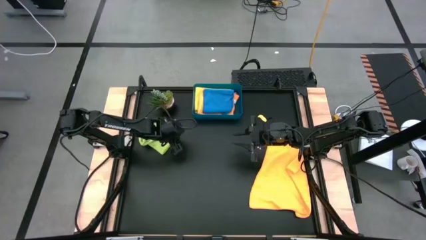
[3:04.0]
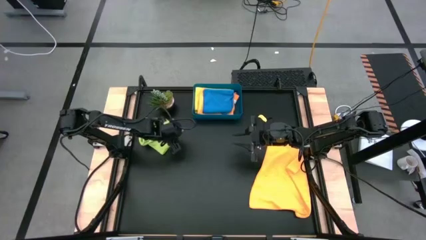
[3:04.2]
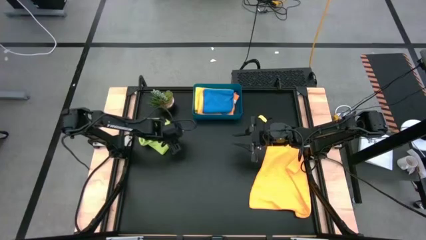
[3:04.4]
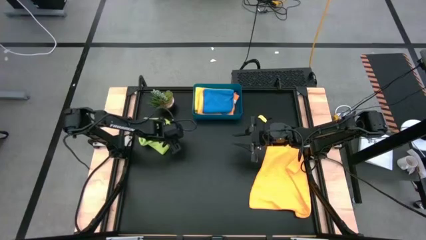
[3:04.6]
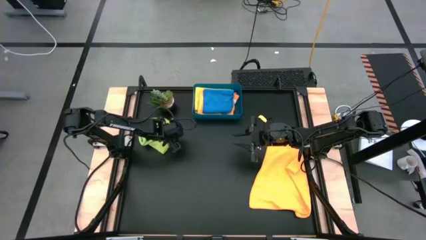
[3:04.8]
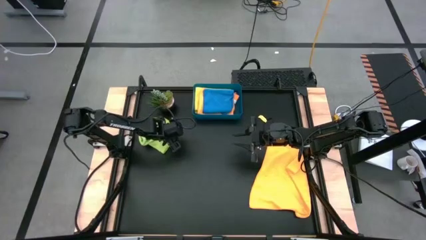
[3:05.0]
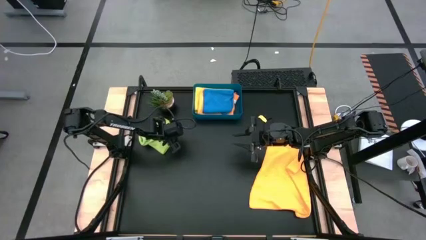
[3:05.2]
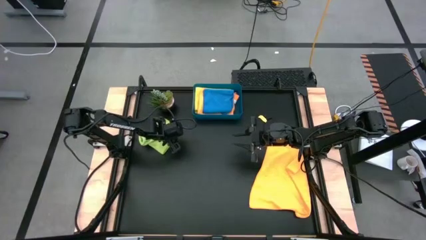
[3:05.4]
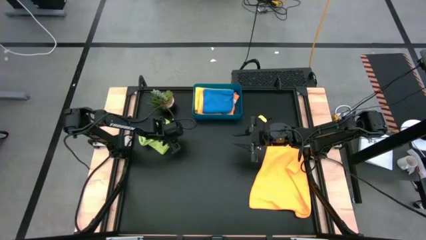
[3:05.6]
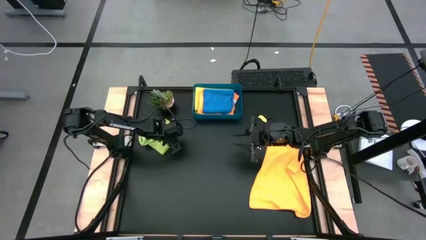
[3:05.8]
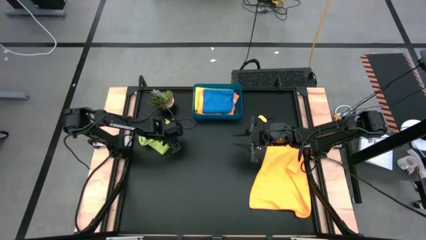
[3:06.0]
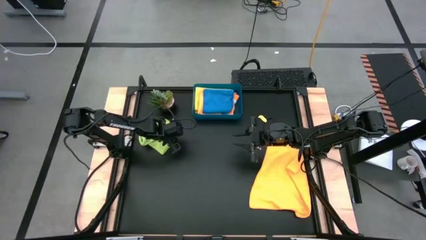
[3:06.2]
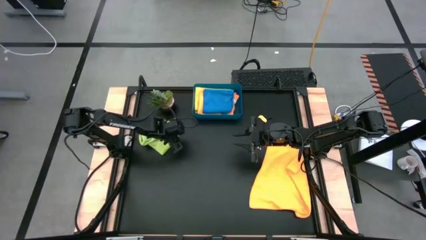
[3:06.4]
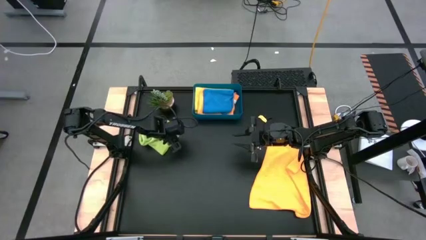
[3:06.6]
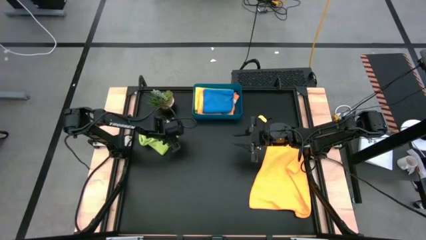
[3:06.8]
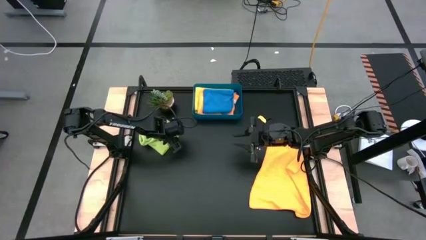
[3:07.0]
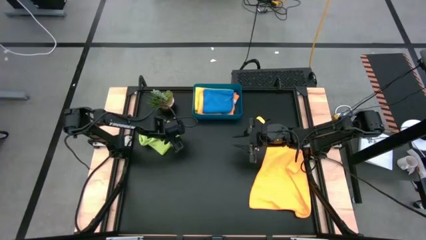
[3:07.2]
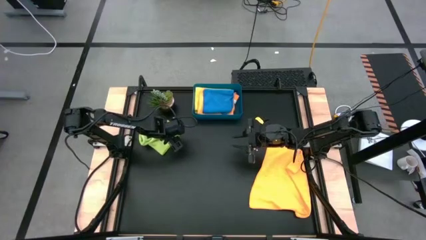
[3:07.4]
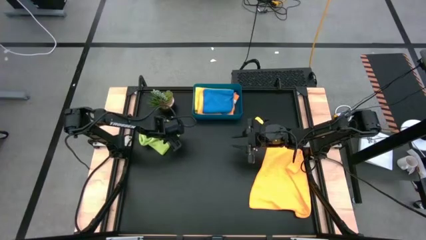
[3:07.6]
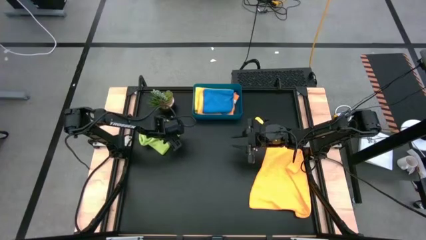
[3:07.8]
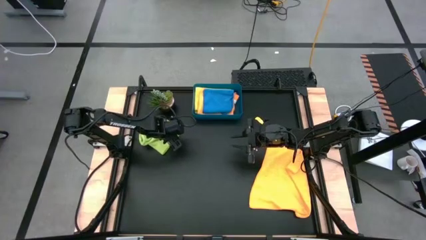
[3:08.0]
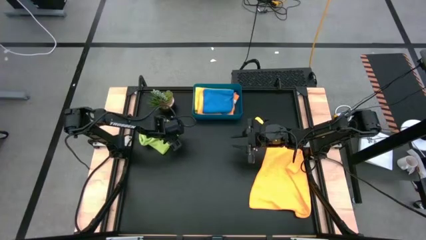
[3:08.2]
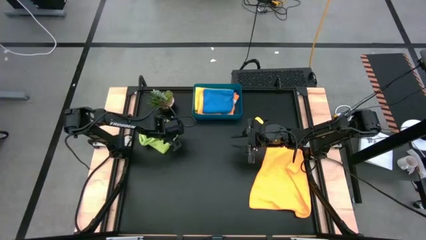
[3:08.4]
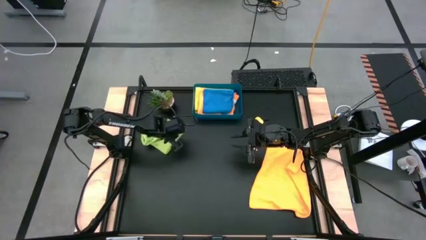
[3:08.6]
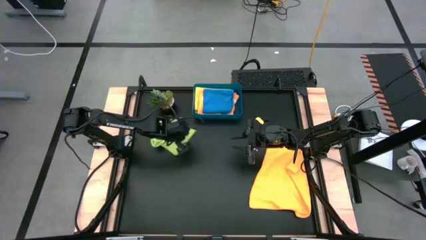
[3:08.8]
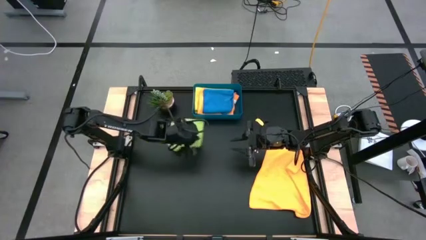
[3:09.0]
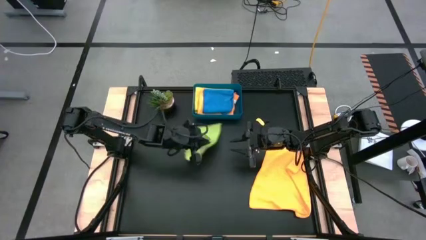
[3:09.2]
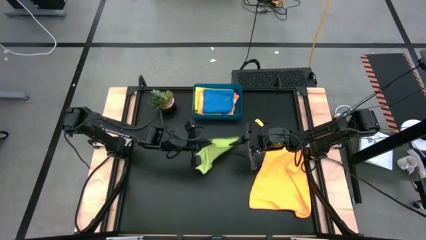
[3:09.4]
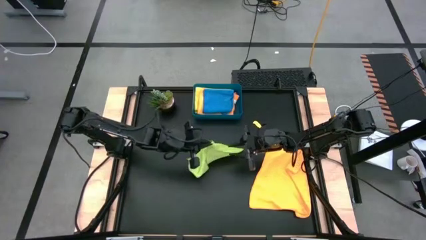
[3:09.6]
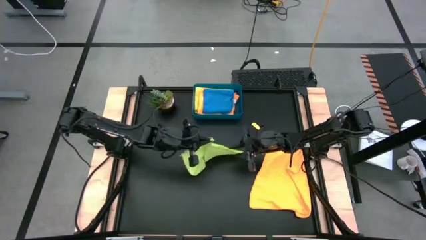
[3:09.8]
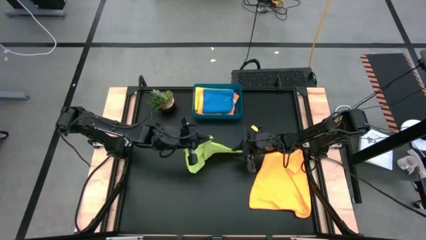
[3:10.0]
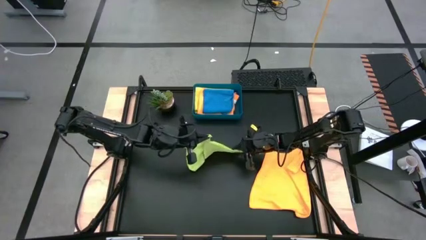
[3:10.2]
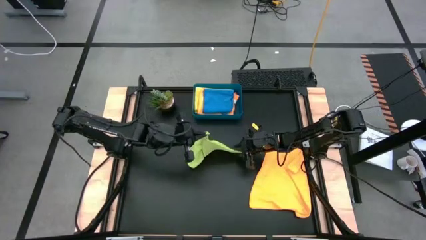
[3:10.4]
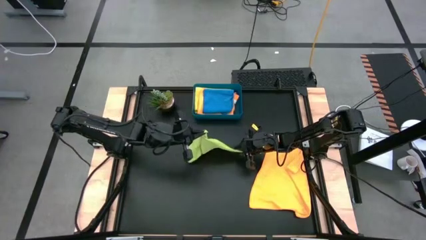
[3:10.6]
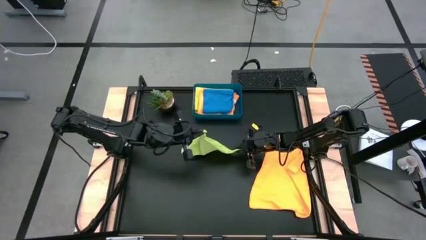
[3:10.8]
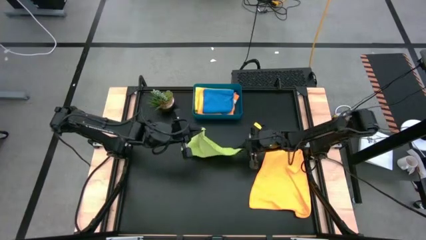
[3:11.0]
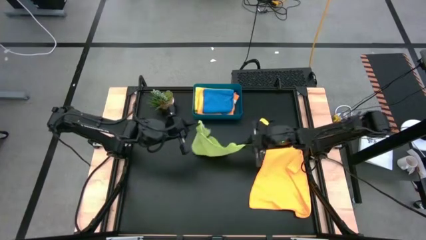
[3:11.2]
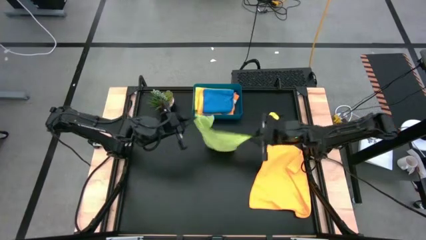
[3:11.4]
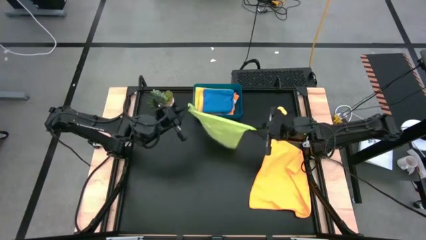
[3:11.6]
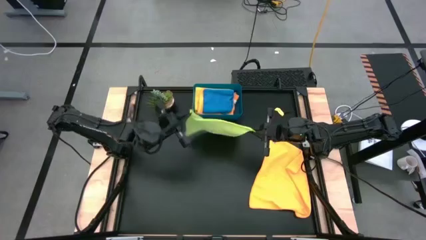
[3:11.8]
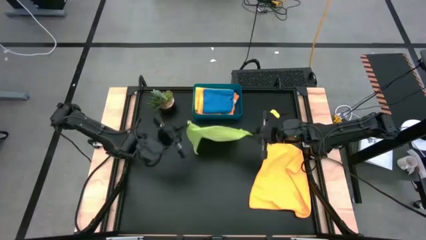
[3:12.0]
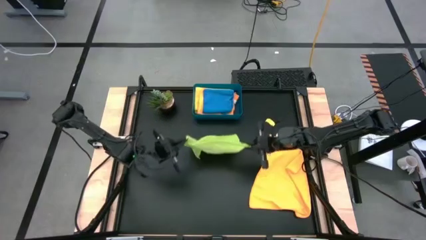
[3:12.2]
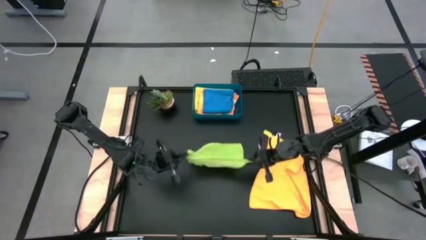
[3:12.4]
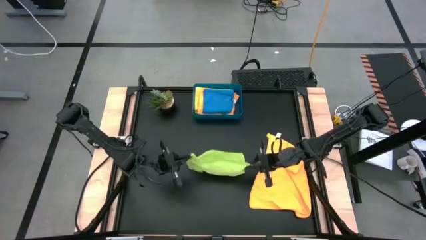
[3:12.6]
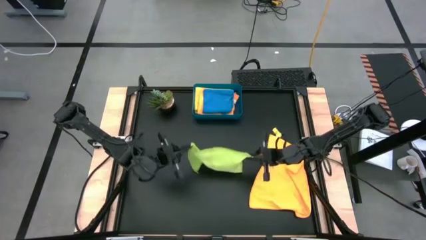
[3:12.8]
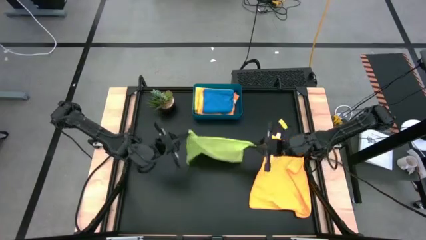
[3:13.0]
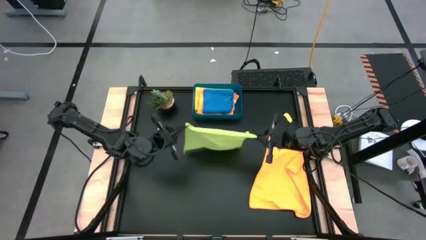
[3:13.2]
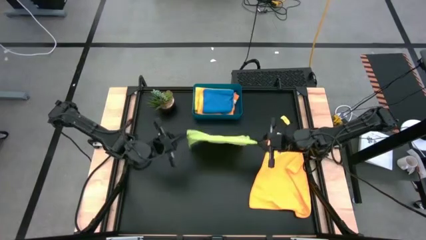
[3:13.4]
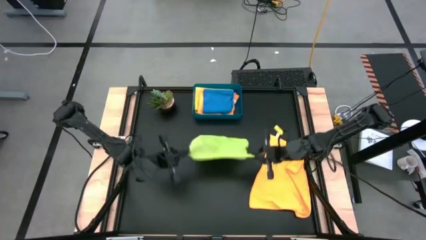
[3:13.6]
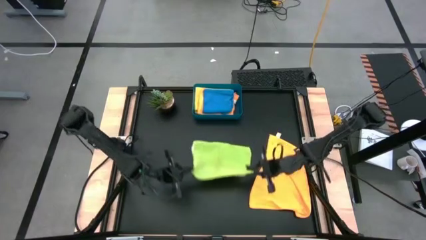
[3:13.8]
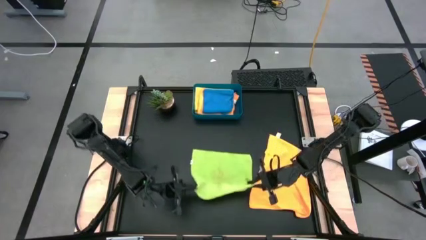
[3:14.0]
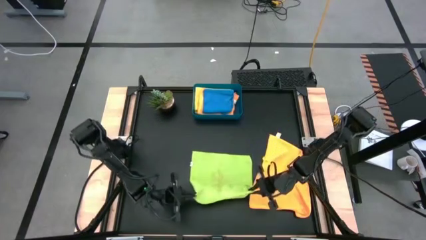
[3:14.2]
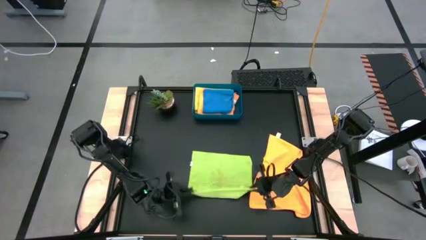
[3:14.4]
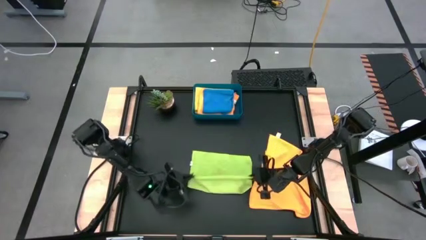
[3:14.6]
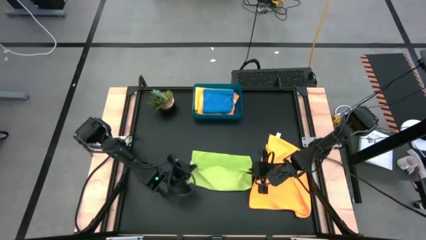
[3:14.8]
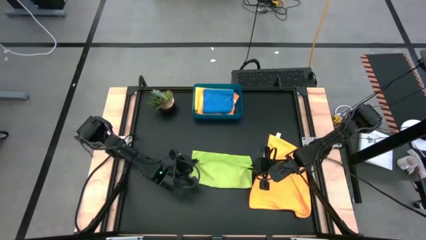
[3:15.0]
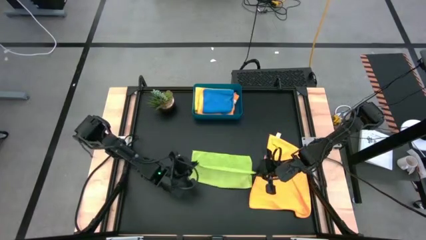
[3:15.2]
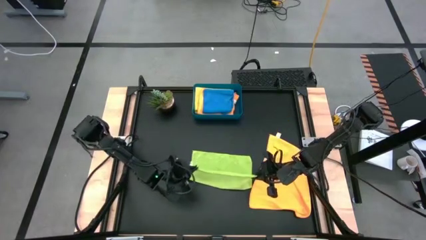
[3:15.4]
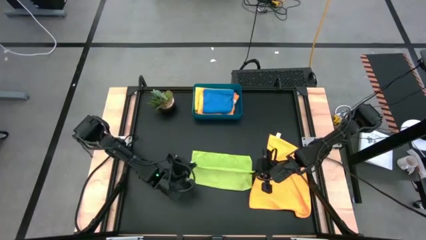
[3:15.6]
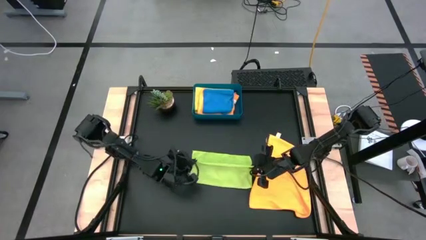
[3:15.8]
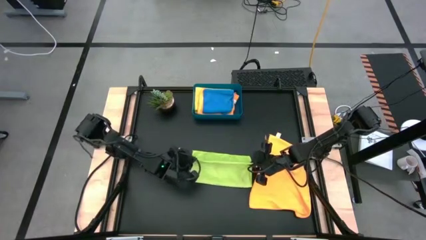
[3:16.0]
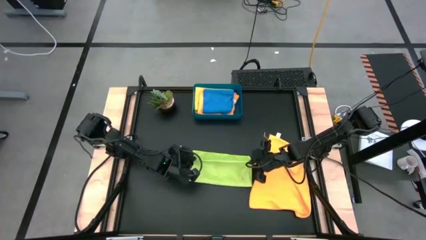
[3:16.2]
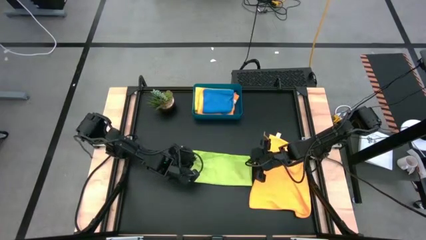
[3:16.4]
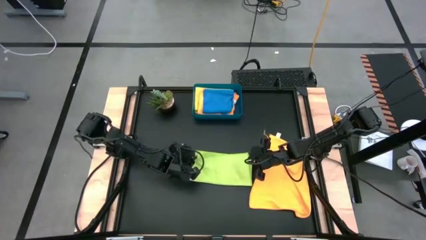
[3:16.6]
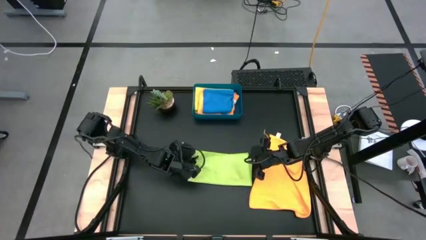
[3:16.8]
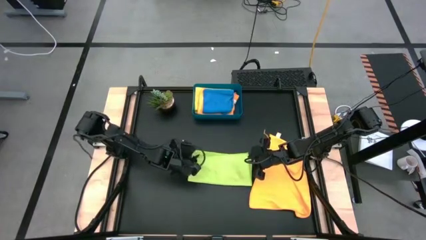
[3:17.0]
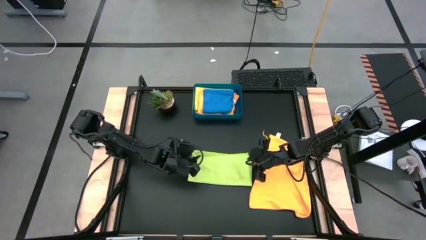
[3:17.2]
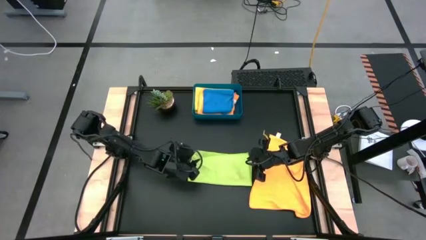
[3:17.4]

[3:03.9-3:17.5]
Task: Fold microfiber towels
Fold the green microfiber cloth

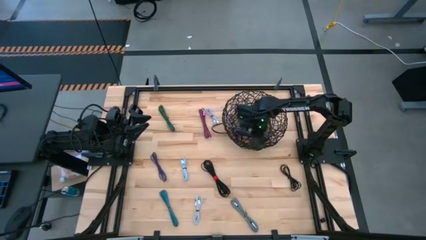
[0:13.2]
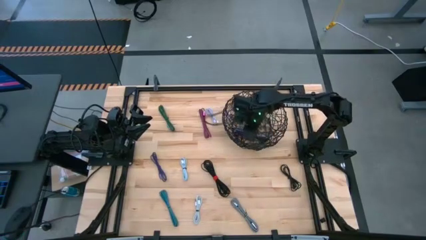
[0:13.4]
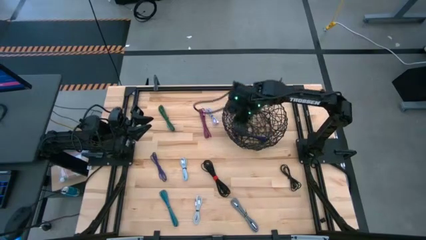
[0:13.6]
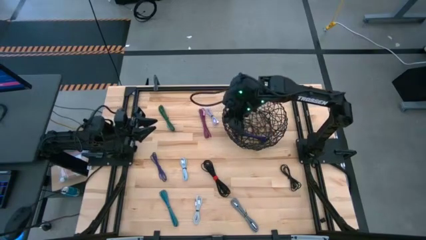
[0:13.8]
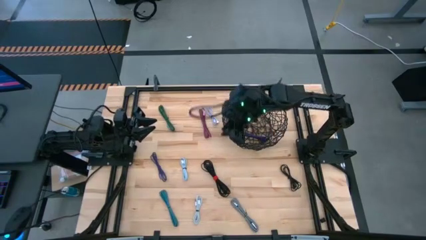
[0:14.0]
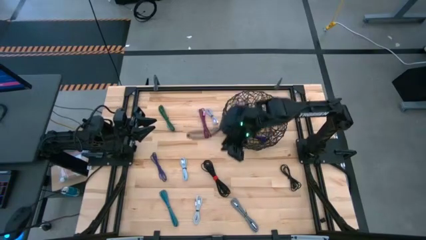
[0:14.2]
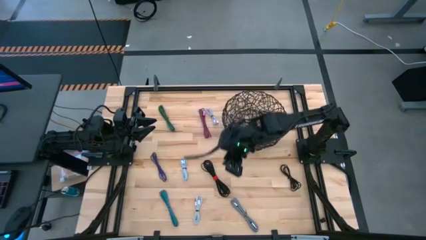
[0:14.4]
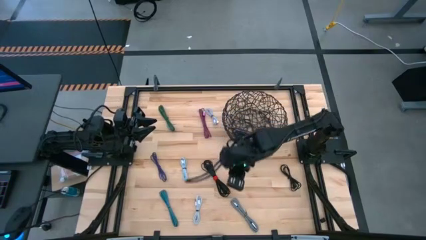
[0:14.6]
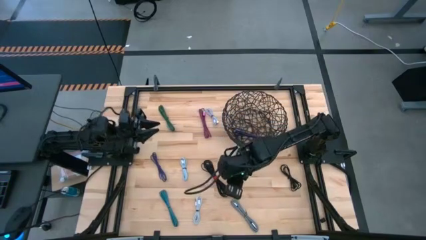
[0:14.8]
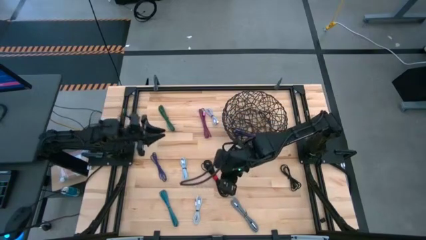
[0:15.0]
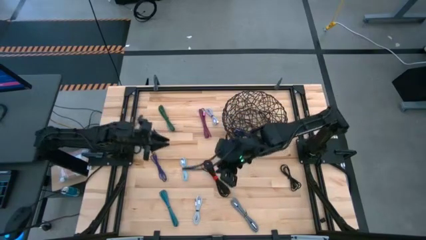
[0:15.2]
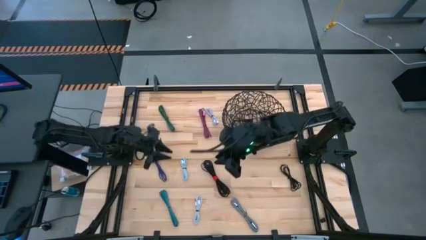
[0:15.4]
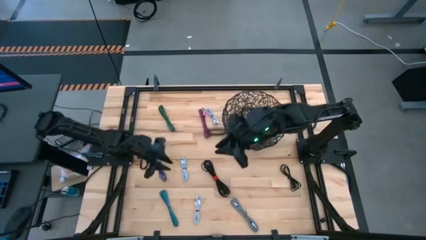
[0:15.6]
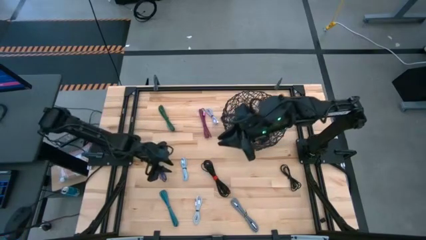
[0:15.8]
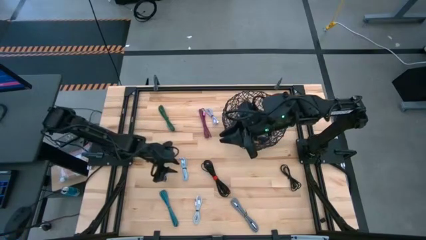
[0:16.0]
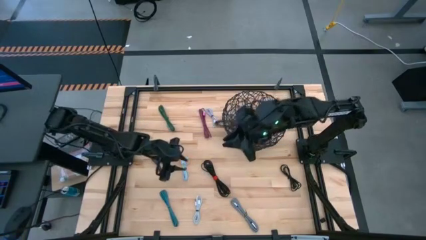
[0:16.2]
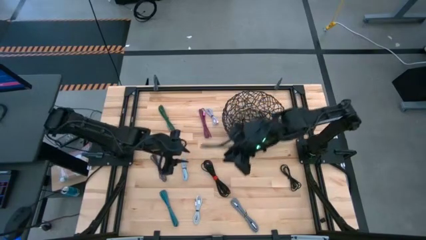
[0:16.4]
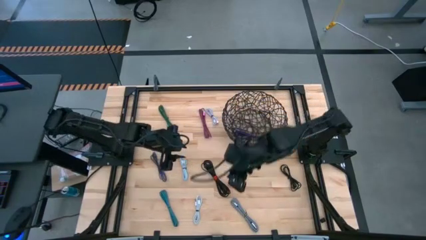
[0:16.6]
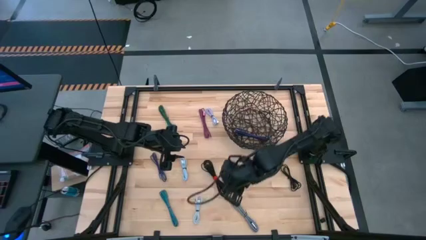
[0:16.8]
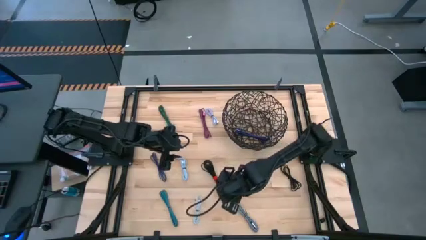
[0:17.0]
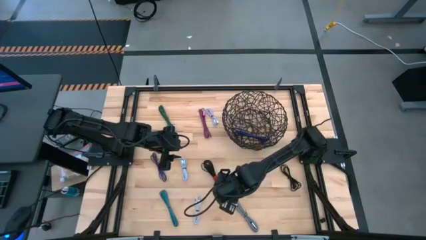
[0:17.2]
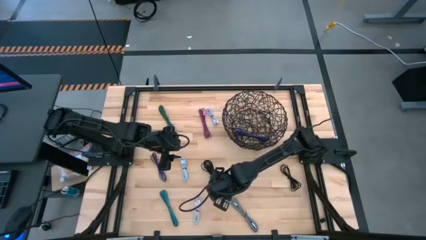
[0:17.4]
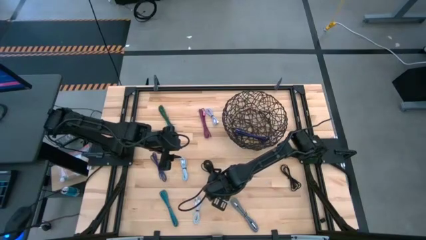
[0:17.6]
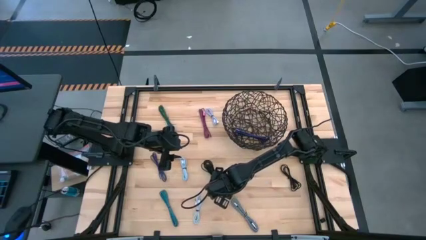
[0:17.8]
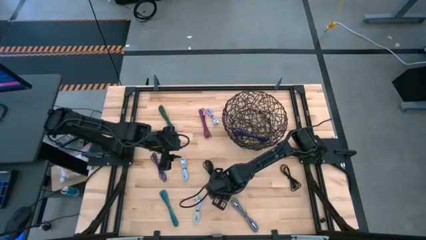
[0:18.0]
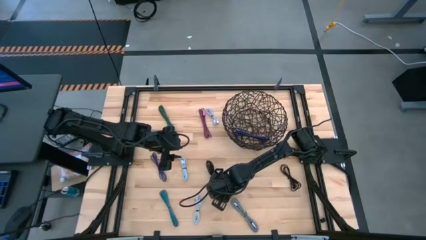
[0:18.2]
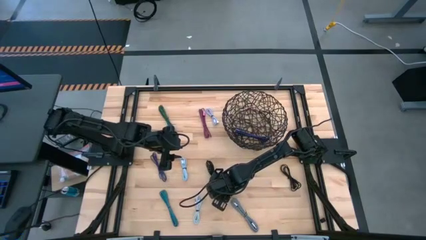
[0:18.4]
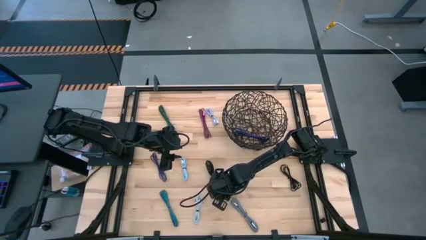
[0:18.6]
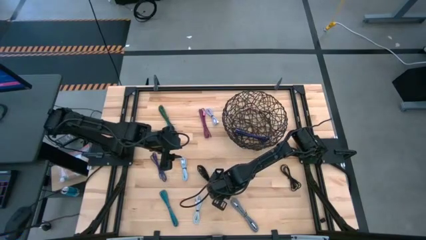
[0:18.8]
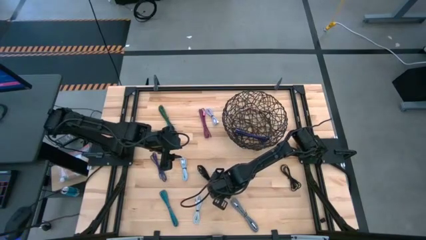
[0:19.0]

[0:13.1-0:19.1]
Task: Pick and place USB-C Cables
Put the left black charger cable into the black wire basket
